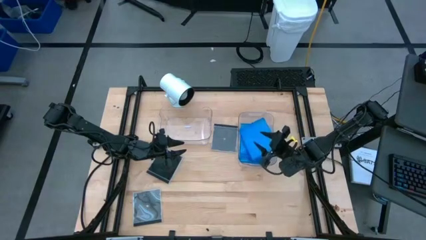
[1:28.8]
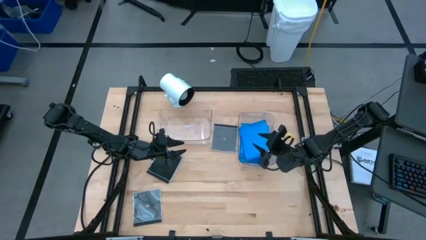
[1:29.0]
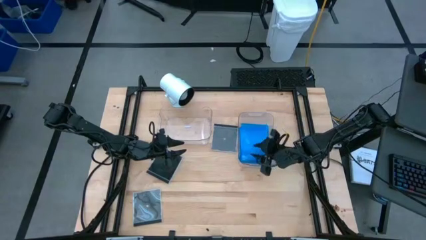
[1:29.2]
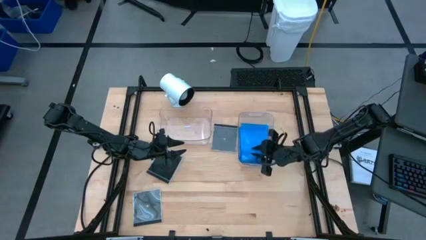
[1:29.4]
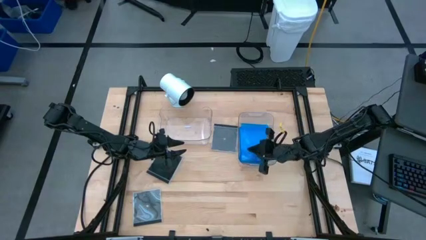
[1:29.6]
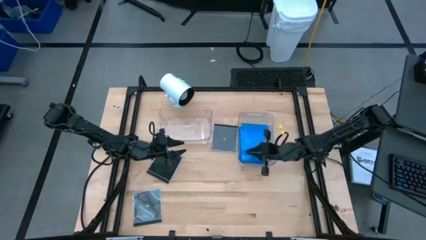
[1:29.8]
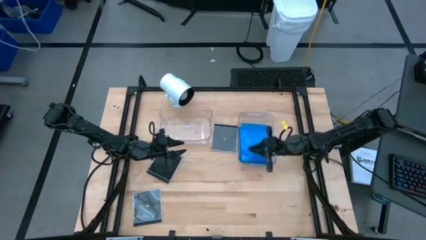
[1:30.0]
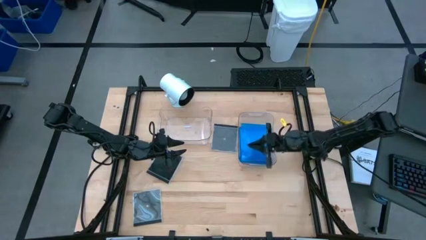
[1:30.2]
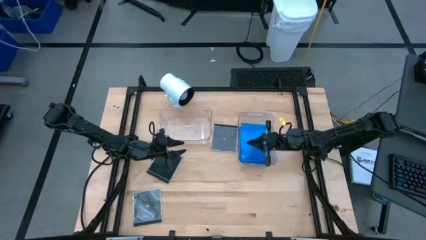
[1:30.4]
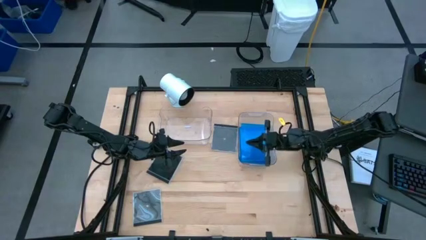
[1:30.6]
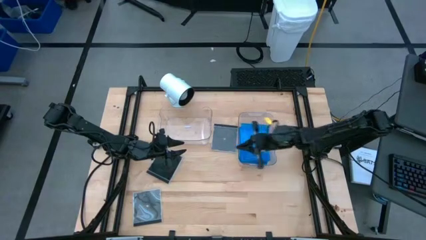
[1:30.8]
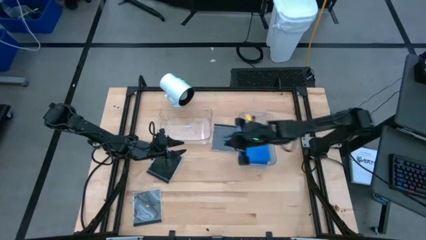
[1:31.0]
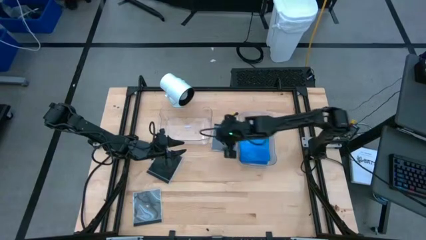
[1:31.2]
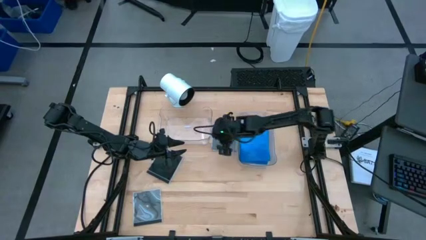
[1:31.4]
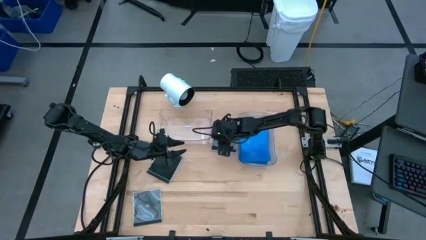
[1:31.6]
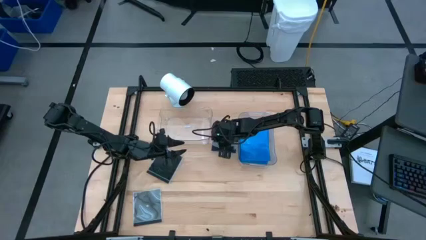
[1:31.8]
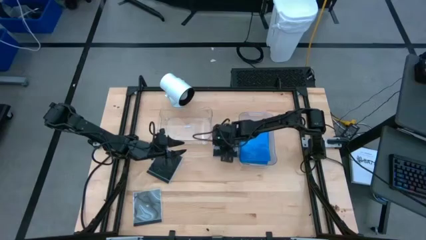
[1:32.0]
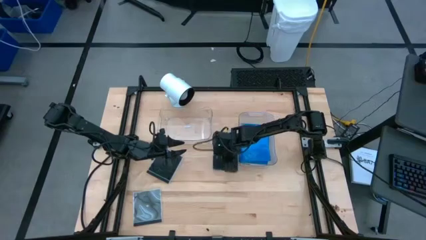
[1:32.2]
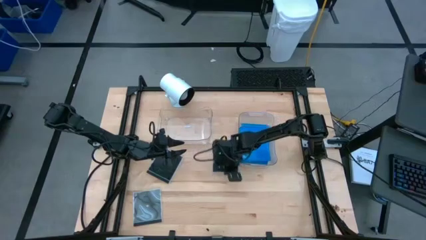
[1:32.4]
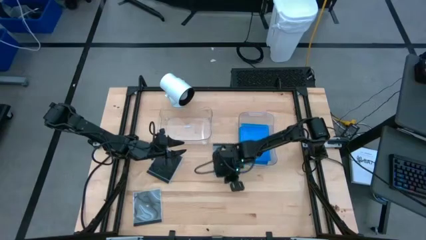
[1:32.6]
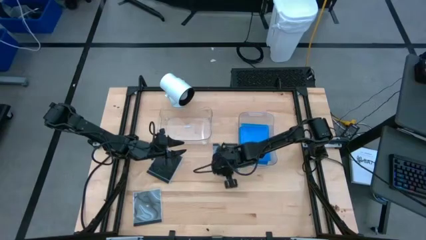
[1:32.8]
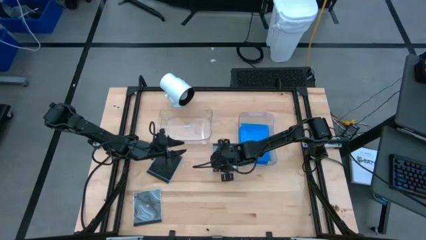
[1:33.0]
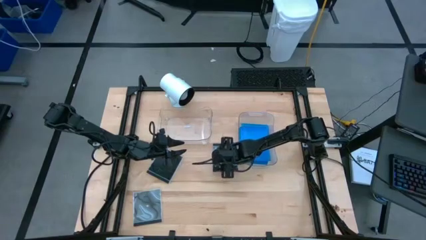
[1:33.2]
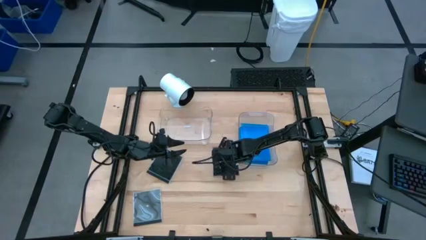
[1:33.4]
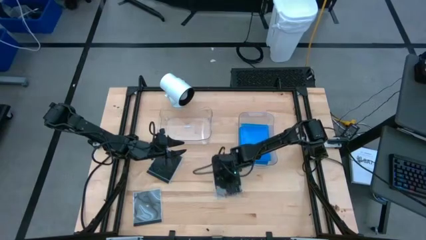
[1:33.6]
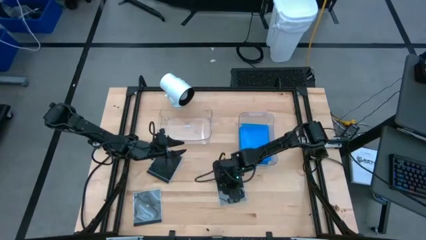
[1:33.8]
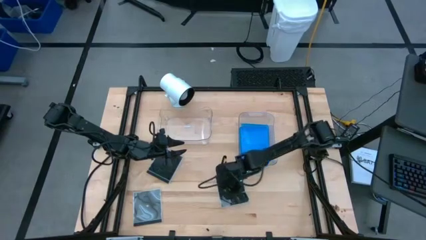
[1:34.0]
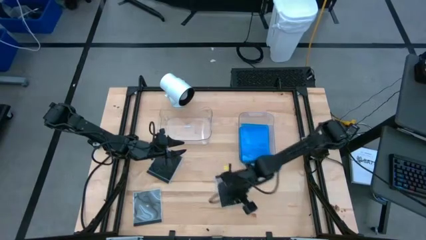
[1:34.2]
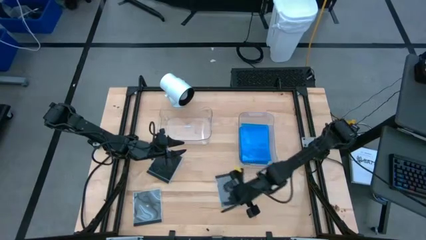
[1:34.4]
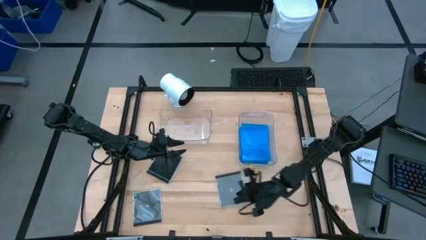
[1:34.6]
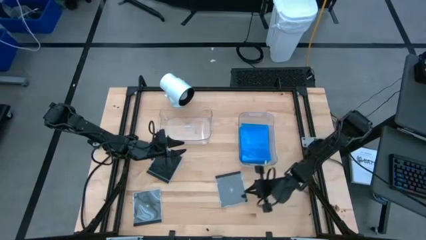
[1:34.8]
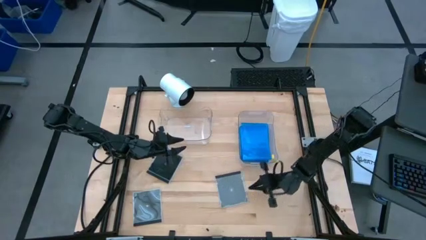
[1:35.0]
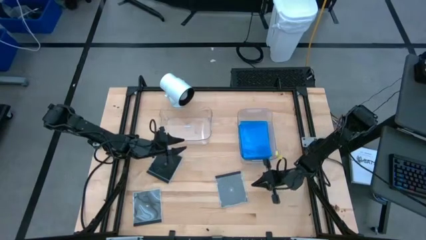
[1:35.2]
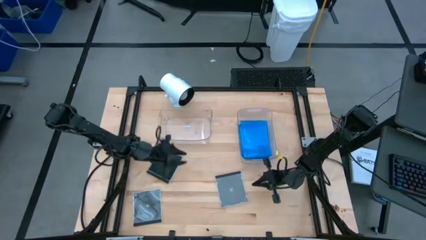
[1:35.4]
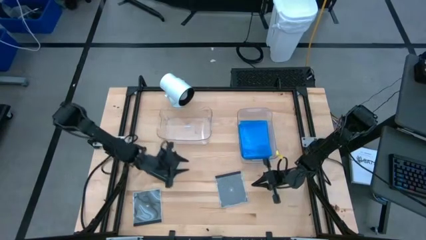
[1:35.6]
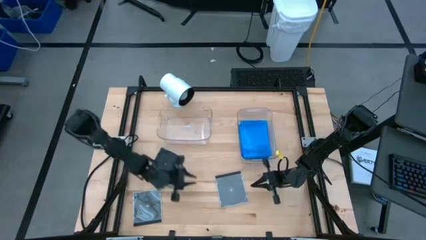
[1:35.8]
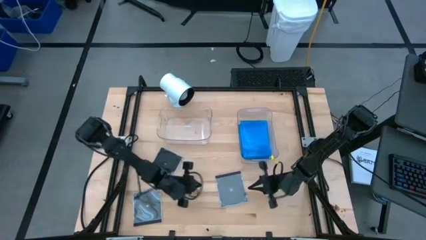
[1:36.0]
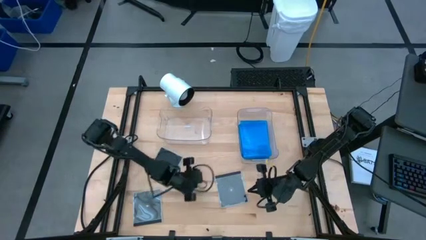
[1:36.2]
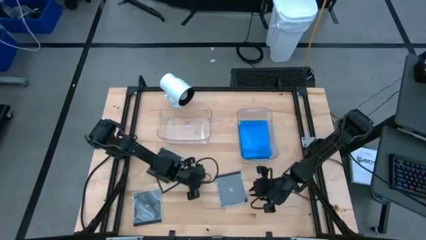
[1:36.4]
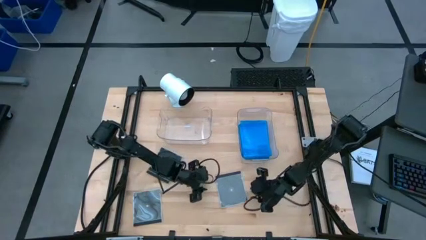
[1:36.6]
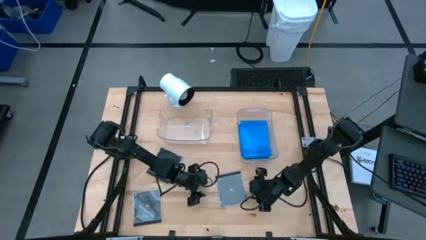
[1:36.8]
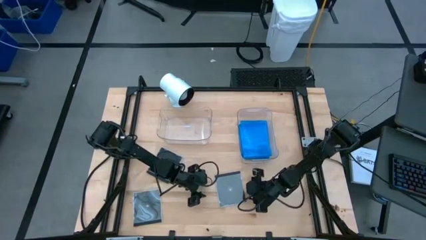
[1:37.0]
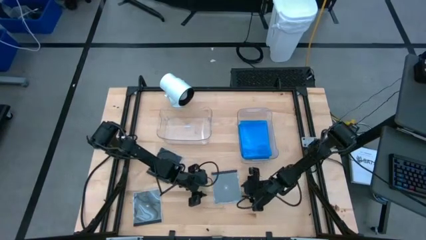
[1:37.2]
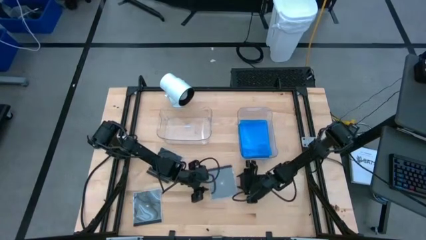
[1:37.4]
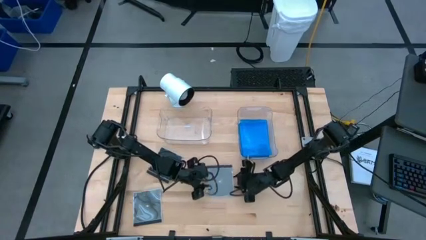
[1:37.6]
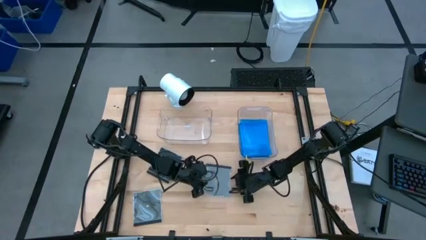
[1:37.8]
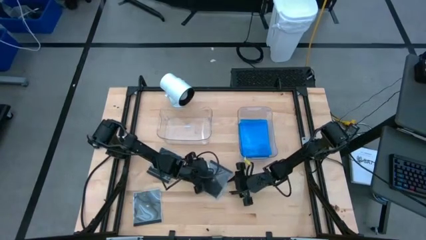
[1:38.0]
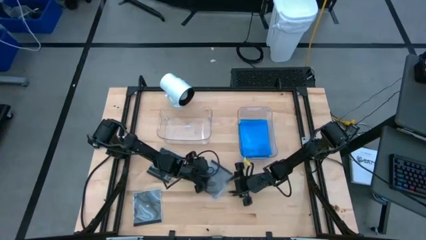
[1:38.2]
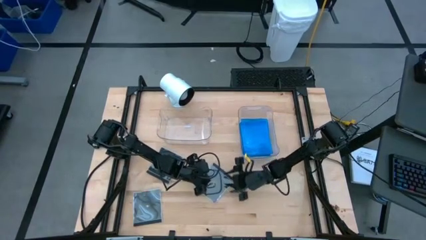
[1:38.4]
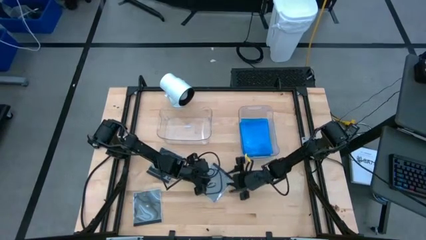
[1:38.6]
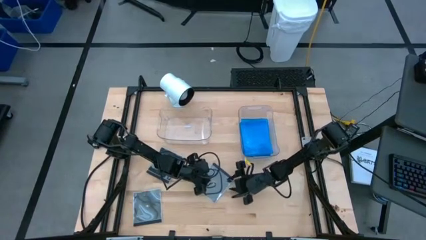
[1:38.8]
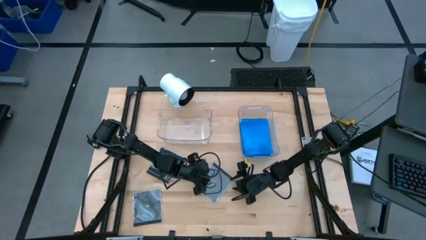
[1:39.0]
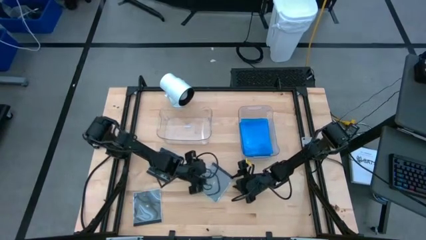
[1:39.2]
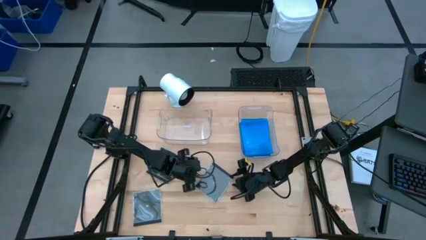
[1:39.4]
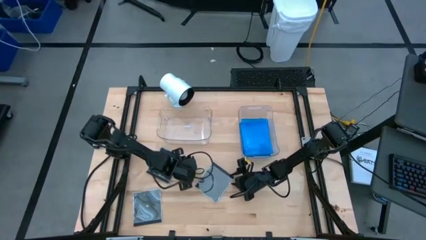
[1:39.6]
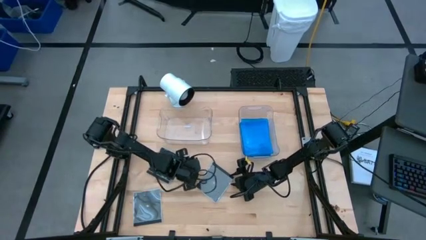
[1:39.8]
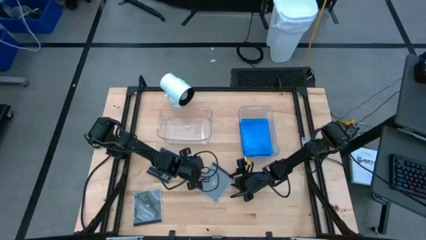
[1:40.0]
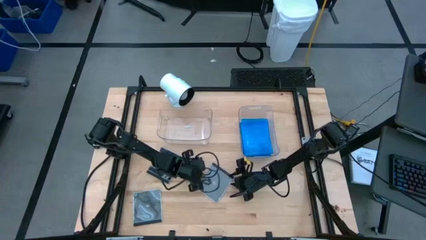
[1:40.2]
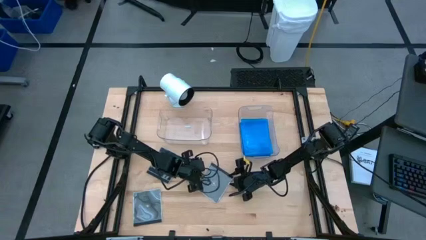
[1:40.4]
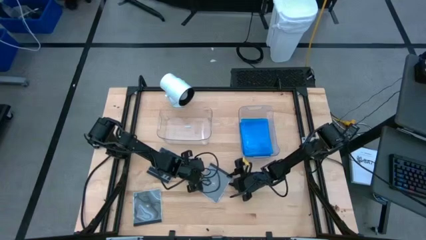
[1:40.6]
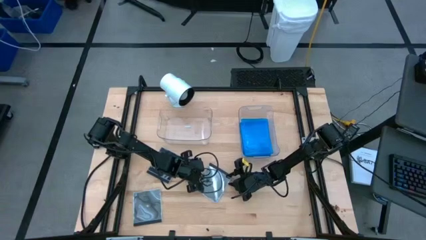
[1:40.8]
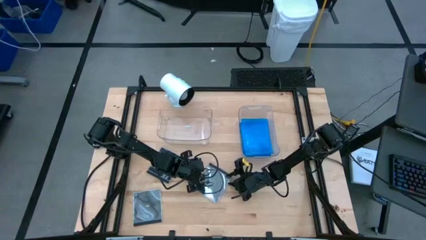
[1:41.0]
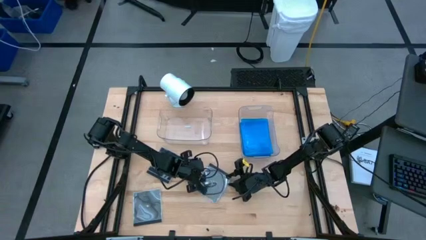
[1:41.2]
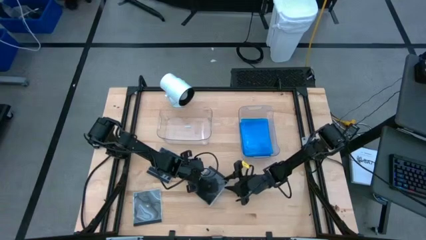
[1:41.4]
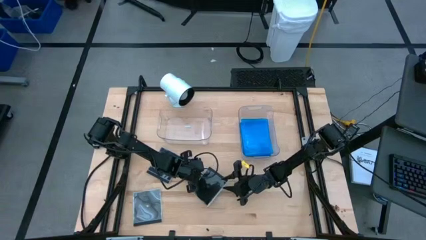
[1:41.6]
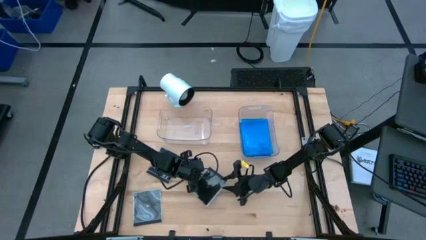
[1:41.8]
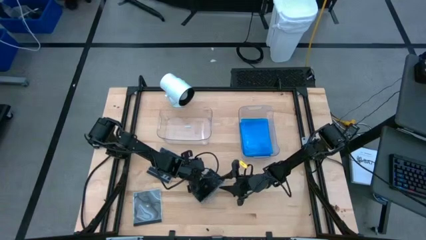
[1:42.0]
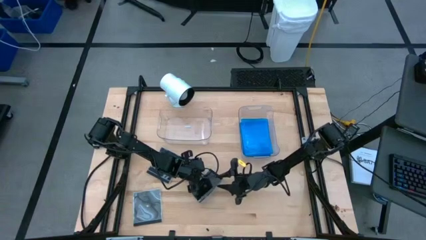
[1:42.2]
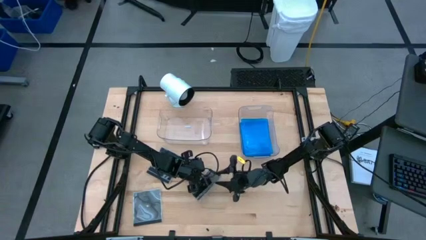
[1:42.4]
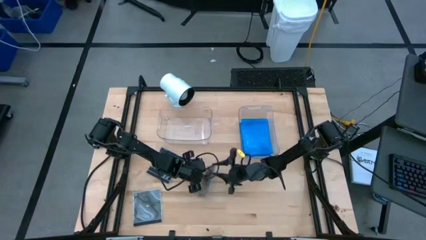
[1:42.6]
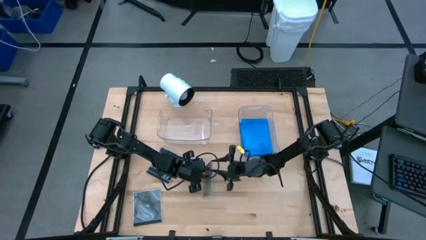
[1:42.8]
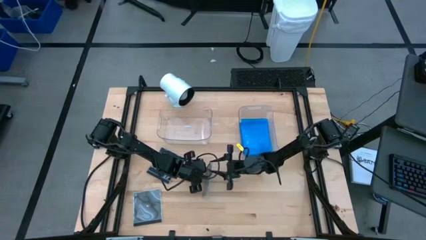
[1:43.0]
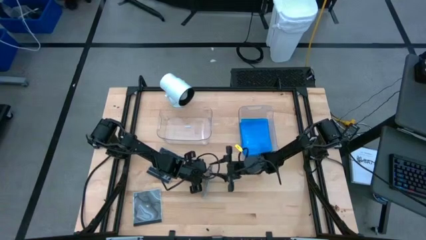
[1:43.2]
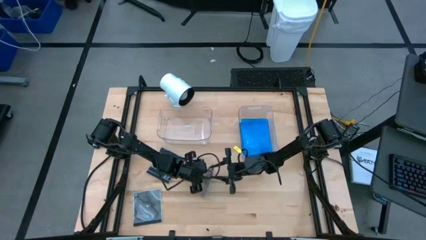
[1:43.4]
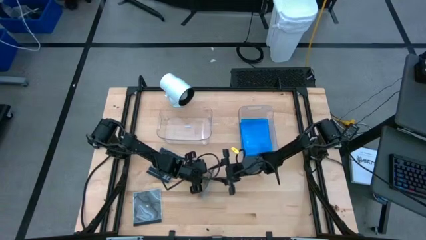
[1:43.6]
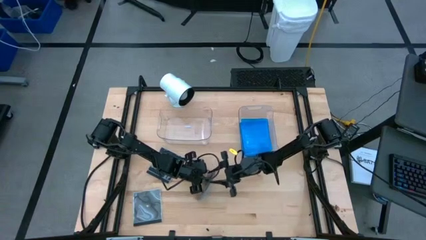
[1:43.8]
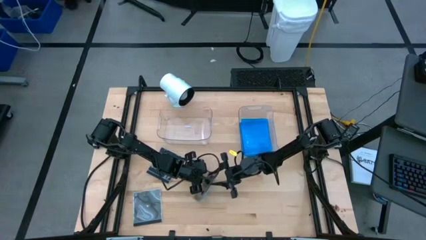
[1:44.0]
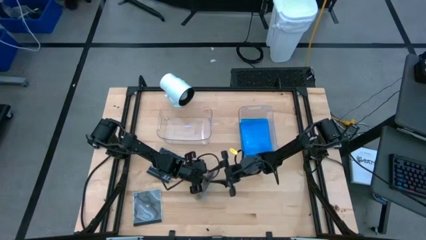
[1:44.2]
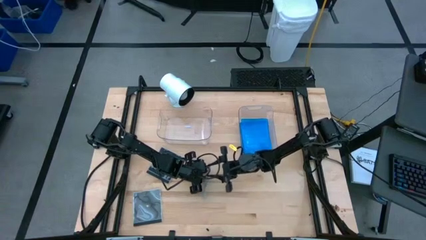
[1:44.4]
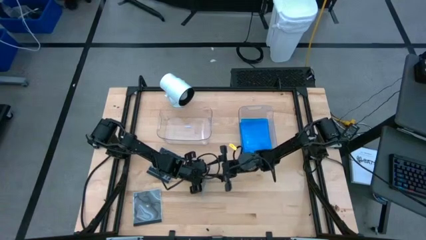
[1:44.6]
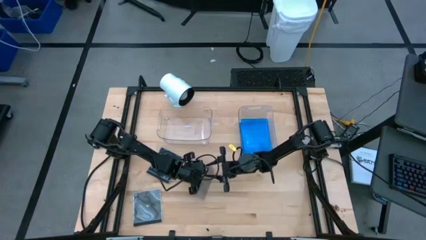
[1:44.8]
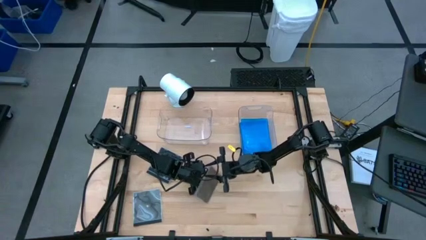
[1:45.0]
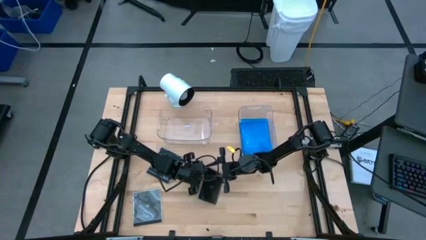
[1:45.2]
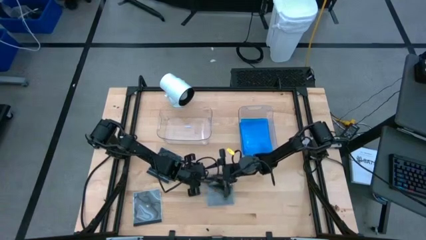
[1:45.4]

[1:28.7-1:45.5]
Task: Pick & place jewel cases by type
Put the top right black cd case into the left transparent bin
